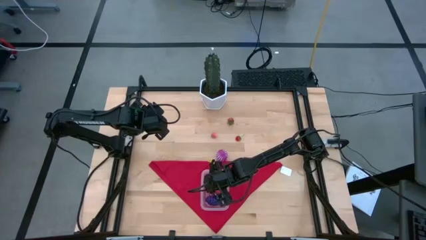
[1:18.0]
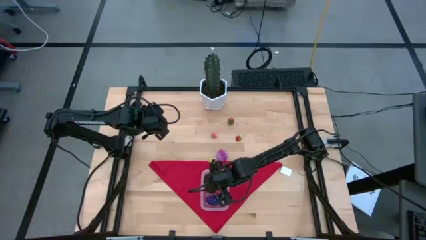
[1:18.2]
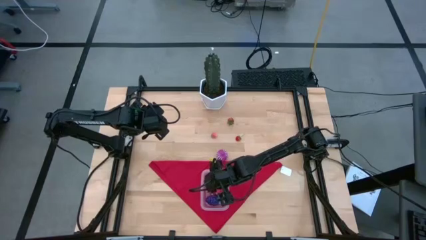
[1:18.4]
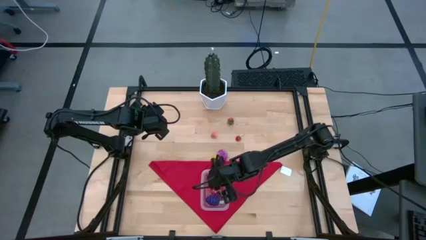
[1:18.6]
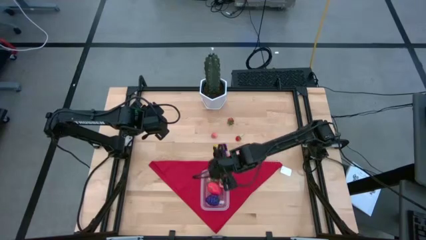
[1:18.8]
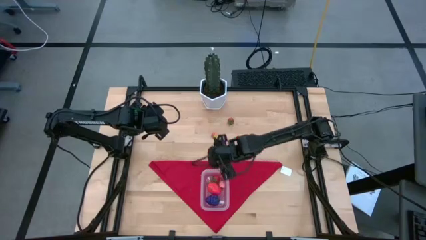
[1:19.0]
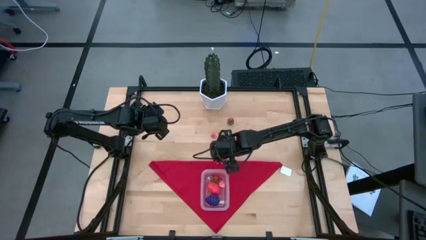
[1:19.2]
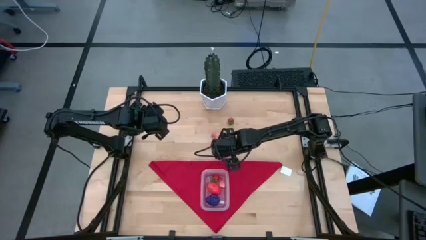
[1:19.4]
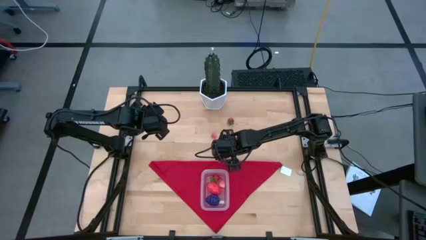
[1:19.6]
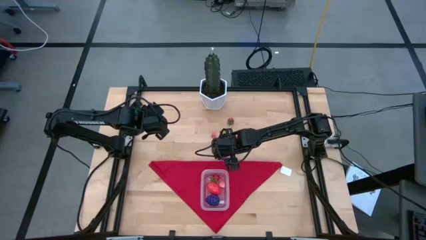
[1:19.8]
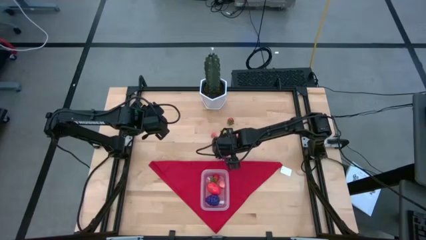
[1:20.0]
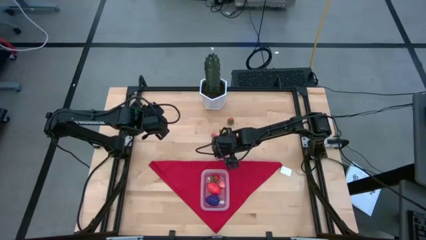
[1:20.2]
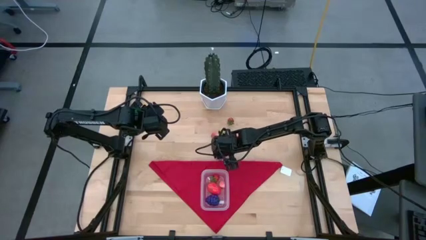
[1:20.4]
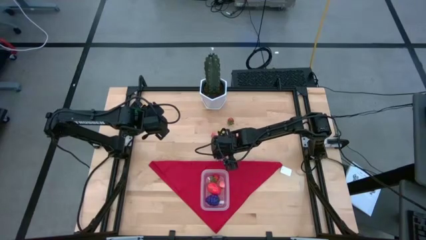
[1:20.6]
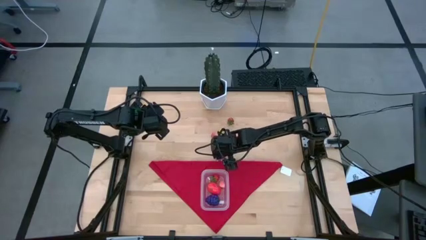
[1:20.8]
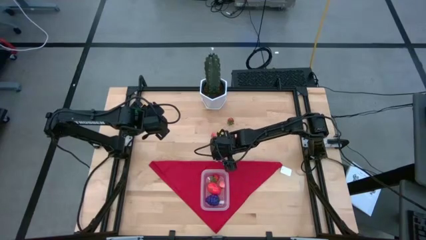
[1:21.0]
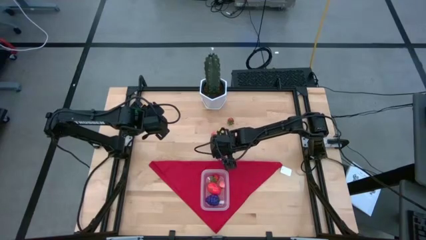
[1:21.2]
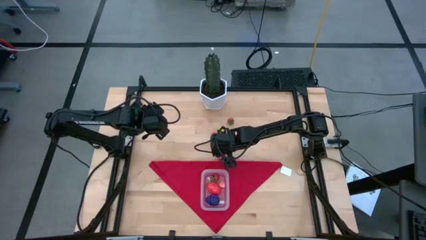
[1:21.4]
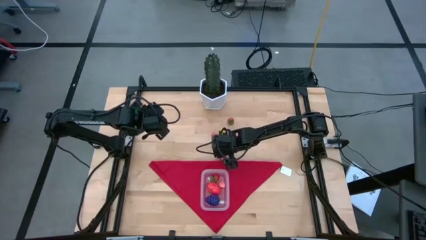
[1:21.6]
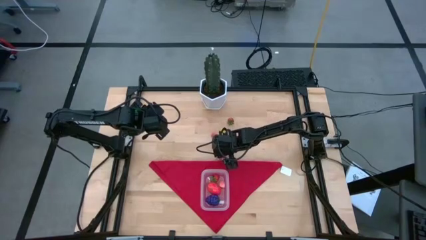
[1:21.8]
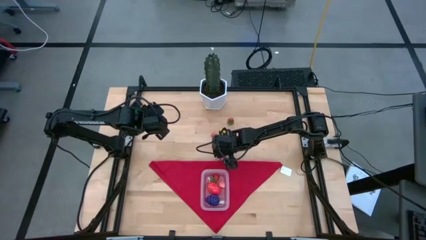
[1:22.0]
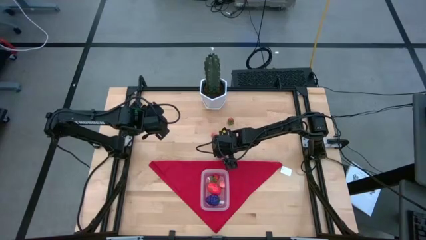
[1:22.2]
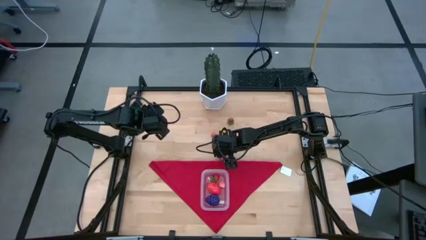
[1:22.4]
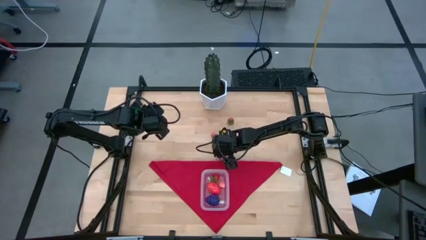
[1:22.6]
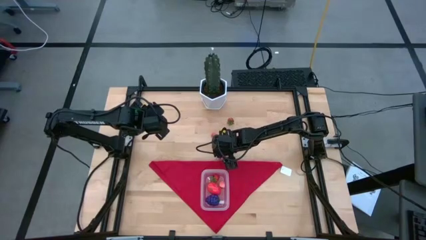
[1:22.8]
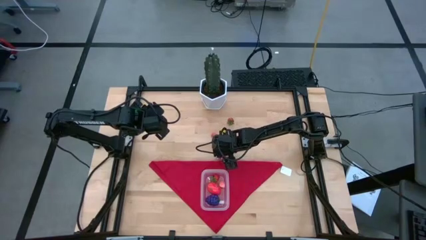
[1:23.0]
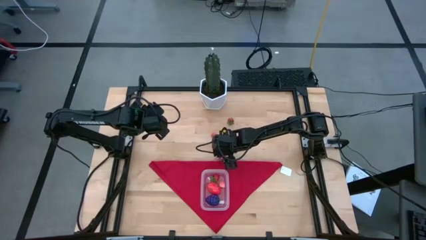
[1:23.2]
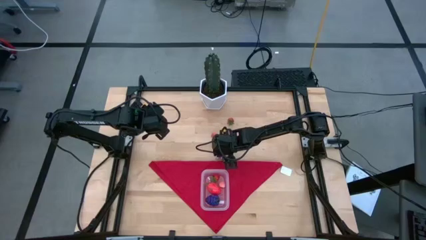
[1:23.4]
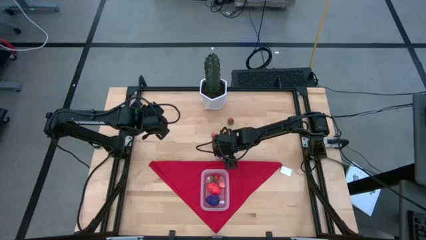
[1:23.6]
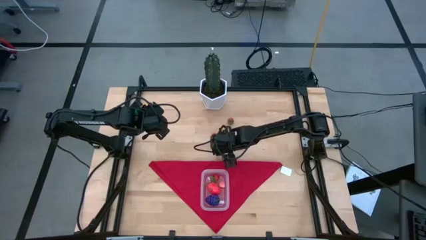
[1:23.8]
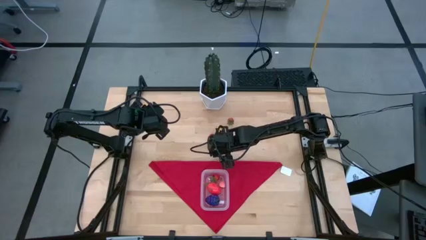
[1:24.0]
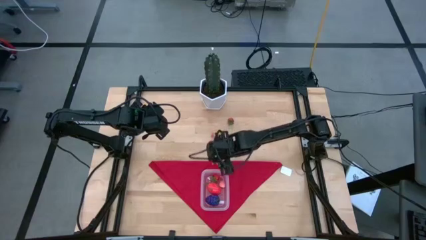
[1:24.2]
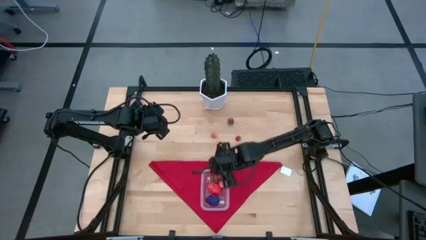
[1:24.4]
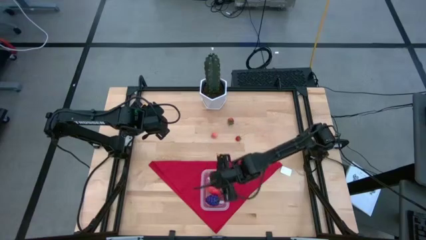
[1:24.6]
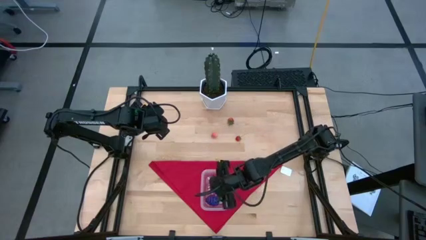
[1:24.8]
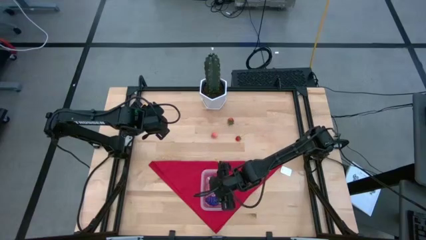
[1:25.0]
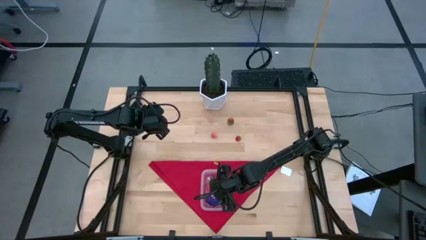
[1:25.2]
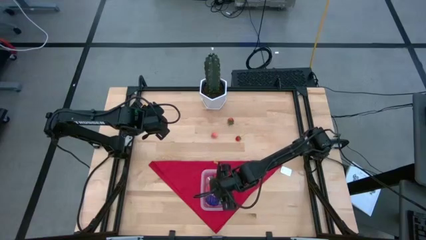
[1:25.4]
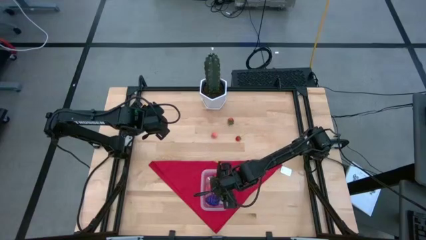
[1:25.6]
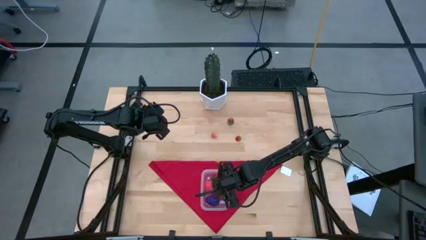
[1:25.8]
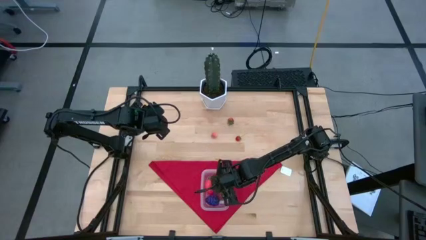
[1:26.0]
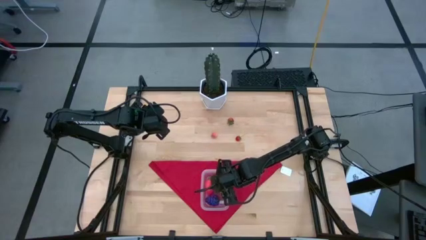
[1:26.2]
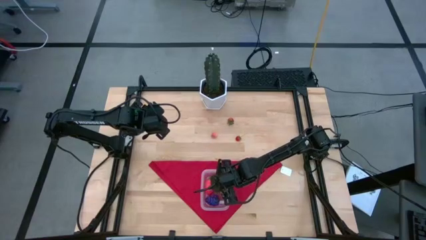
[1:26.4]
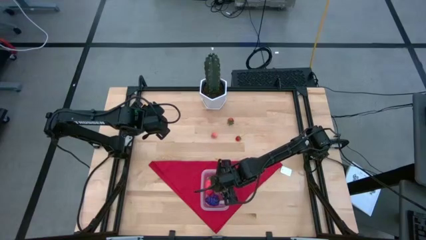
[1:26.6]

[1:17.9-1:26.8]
Task: Pick and placing Produce into tupperware
Put the onion into the transparent bin

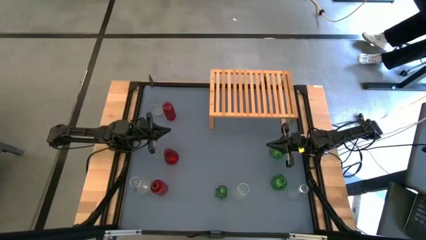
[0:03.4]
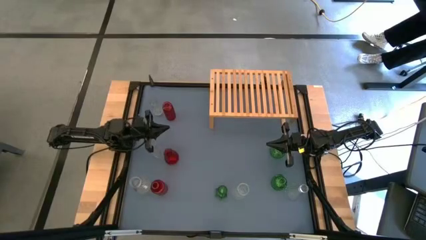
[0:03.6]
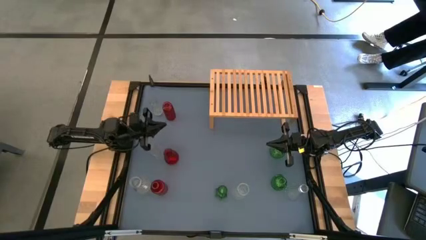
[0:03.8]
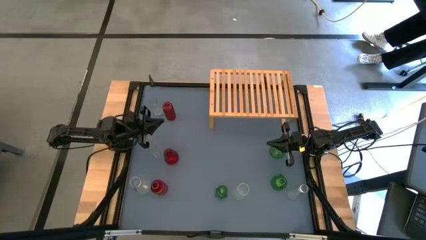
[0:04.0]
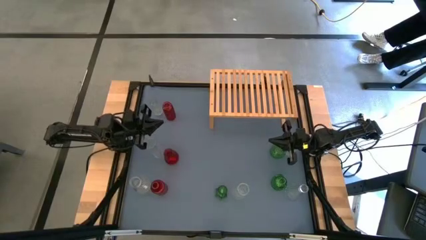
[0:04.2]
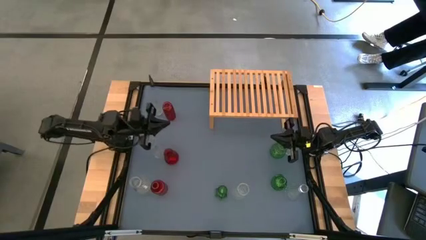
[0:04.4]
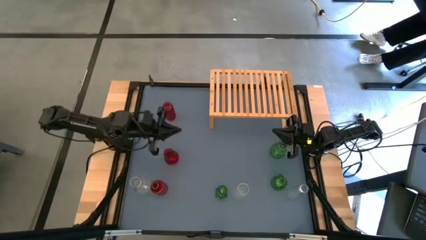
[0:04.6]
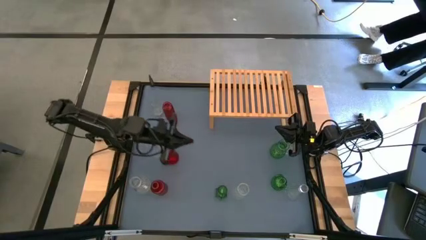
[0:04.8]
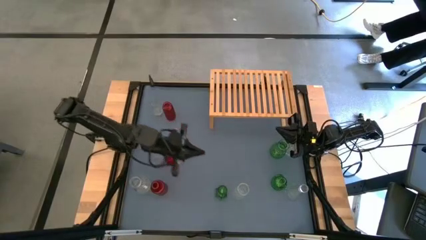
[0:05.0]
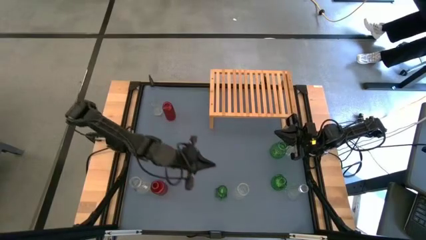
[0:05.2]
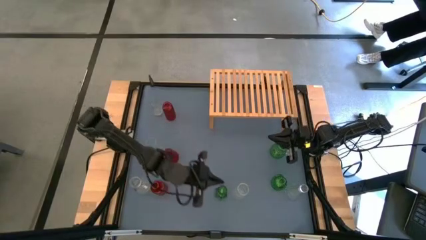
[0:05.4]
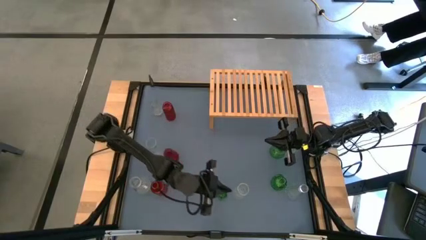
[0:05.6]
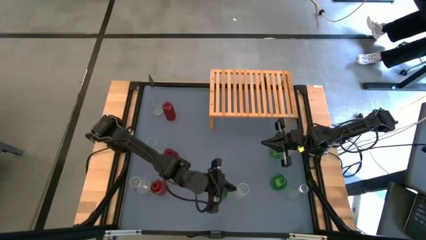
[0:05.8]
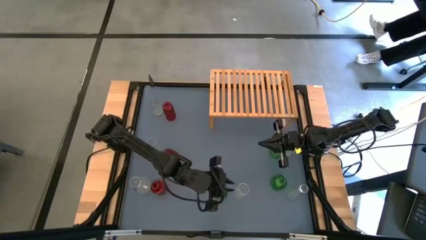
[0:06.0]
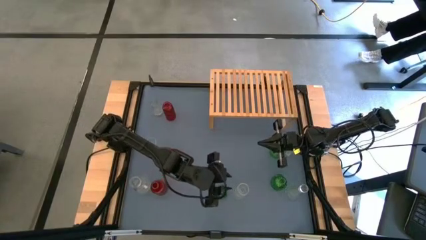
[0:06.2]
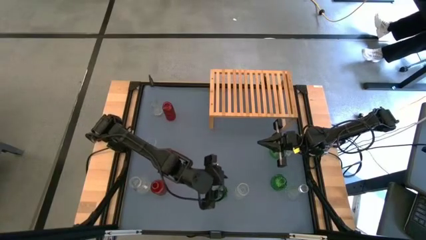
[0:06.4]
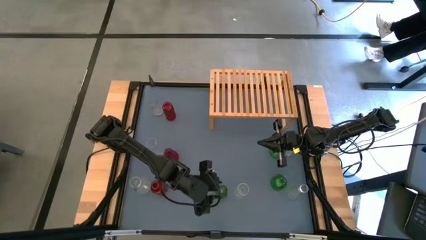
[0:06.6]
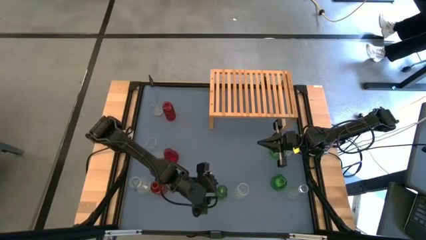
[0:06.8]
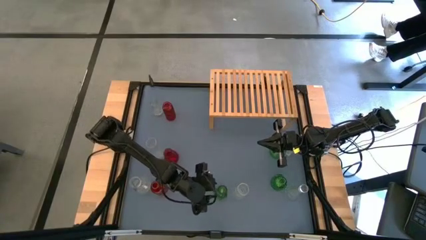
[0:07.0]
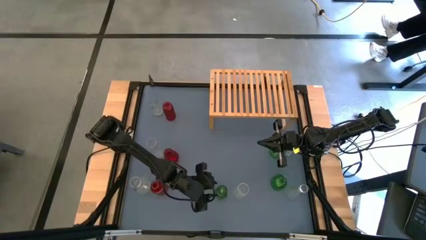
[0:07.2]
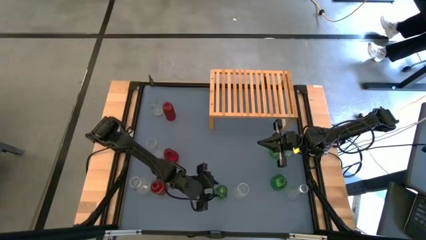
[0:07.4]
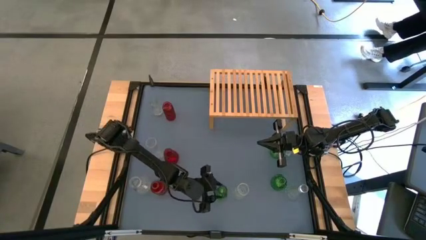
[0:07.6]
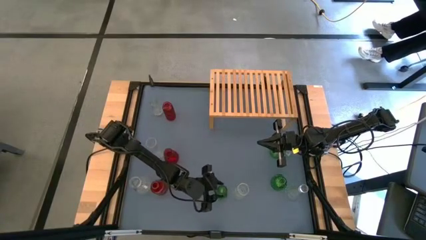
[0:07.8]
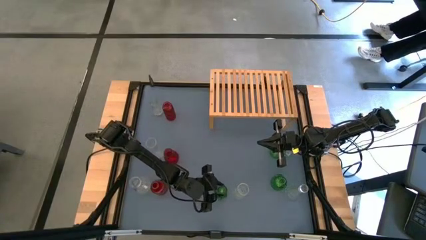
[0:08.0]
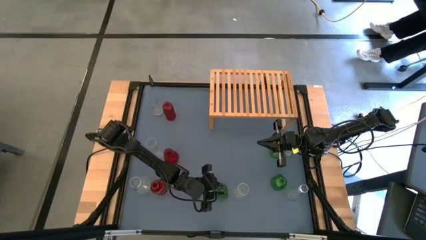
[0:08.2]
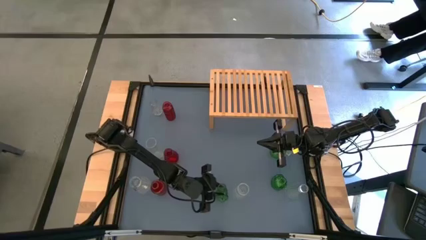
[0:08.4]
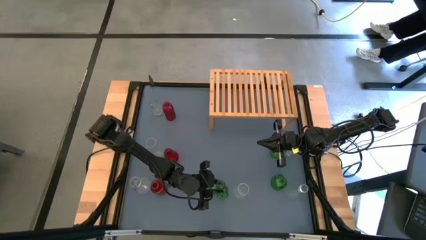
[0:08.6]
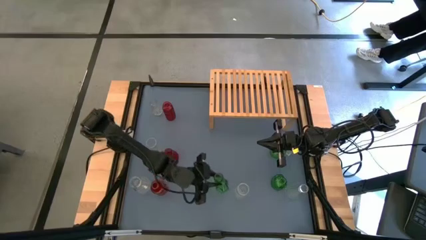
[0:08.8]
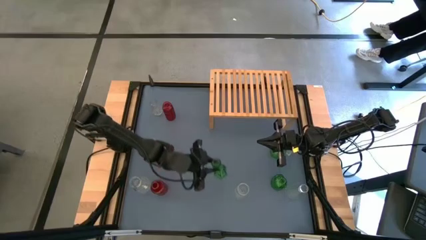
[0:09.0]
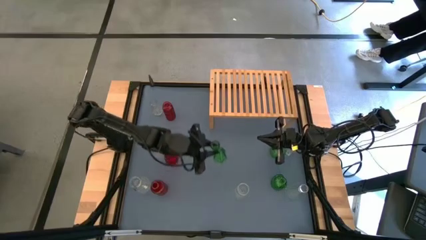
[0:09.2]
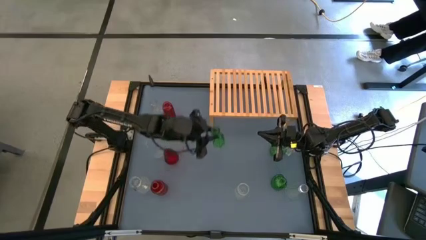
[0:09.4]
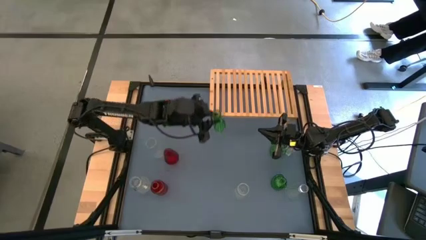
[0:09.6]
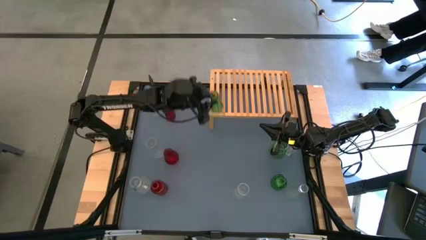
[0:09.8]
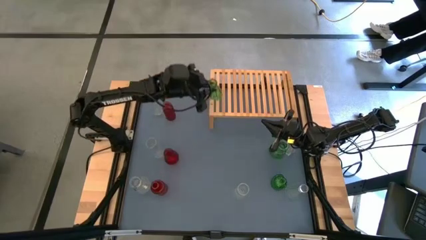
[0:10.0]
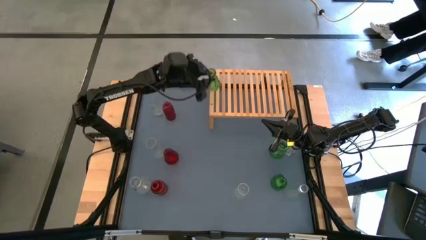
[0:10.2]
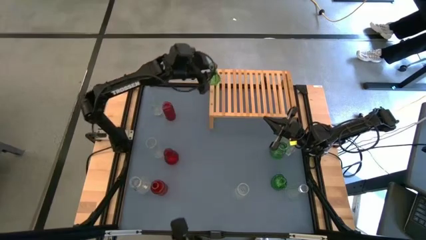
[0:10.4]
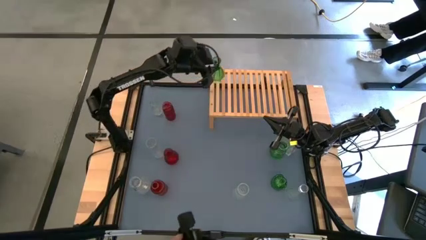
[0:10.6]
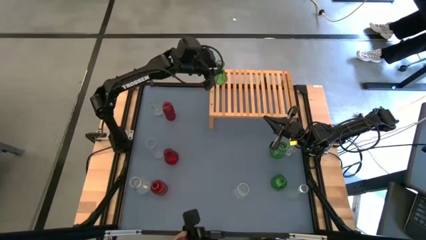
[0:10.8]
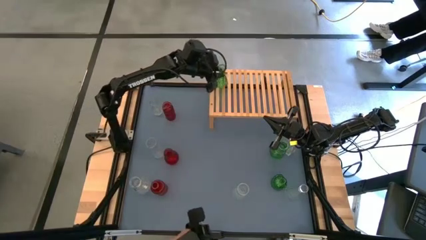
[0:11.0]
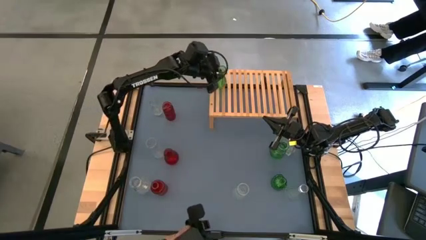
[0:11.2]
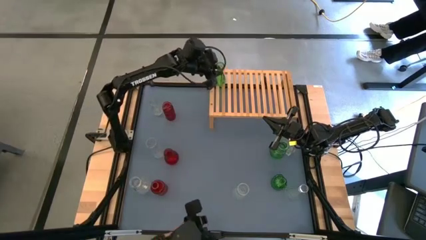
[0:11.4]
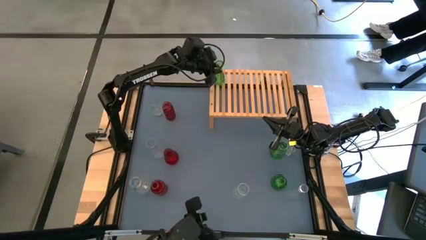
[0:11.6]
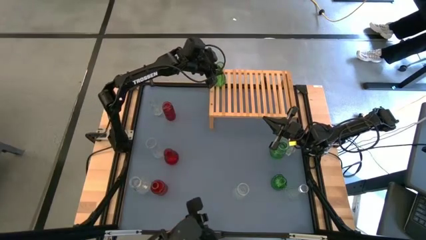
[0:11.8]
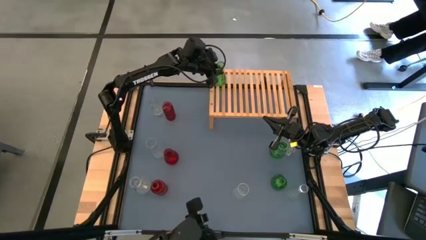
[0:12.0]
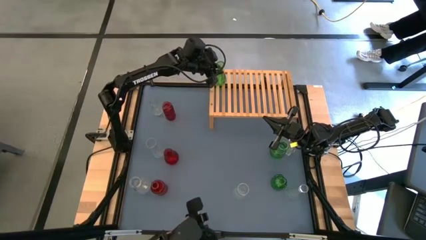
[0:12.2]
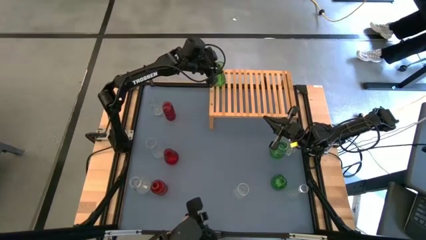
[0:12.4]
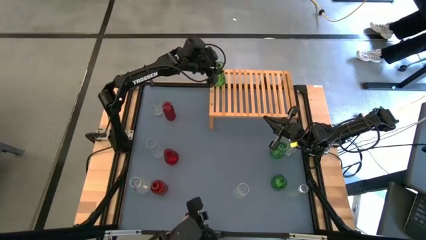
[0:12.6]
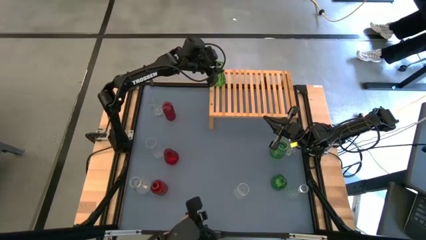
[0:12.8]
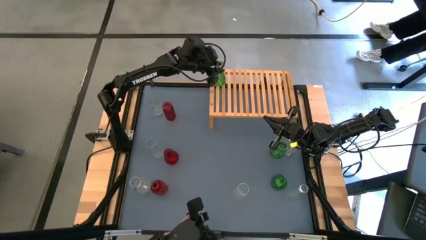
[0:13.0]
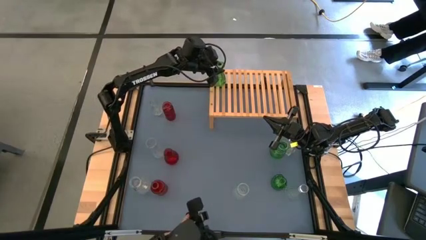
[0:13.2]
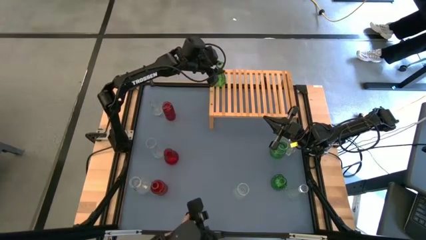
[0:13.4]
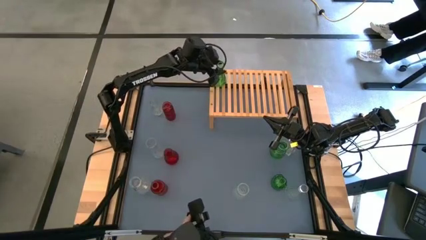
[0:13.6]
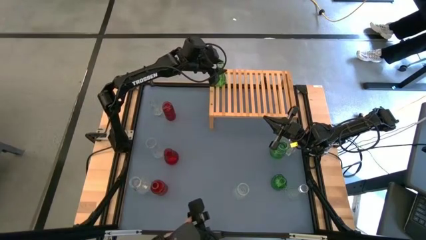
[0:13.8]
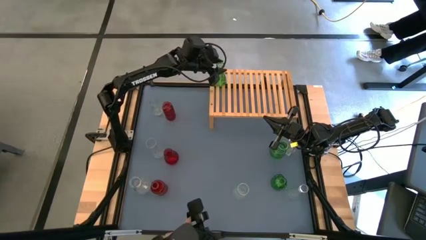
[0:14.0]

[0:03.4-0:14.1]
Task: sort vases onto shelf
Put the bottom left green vase on the shelf
